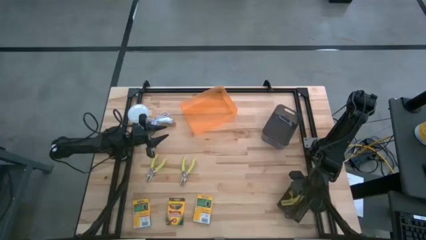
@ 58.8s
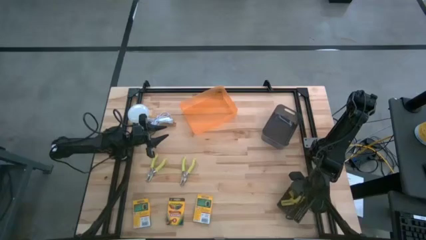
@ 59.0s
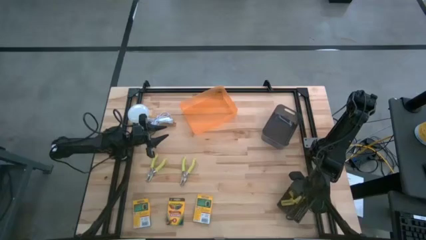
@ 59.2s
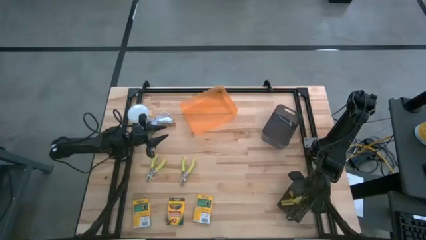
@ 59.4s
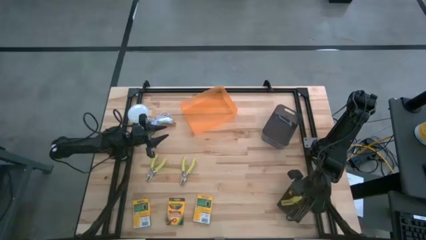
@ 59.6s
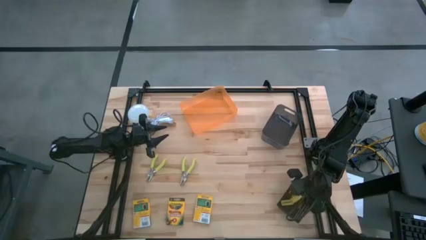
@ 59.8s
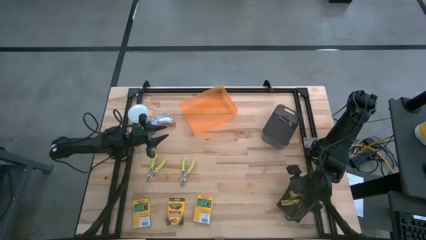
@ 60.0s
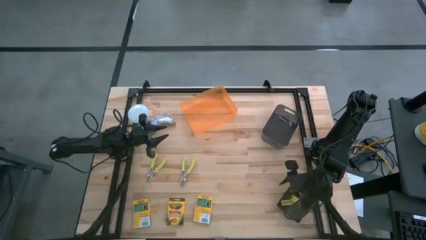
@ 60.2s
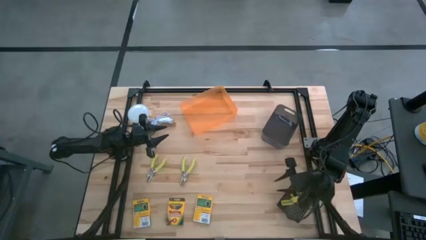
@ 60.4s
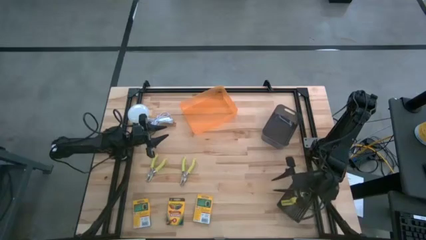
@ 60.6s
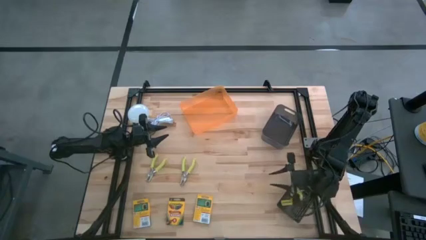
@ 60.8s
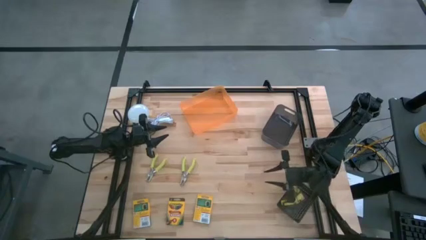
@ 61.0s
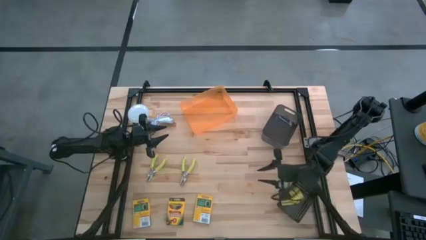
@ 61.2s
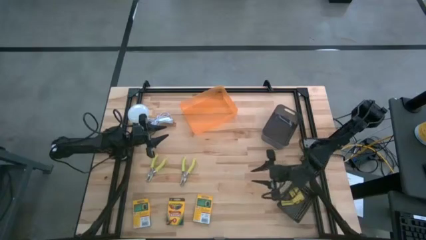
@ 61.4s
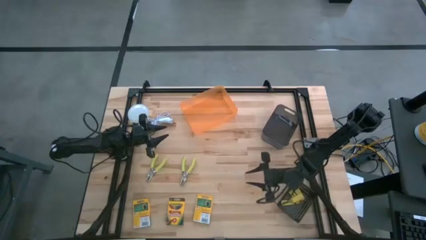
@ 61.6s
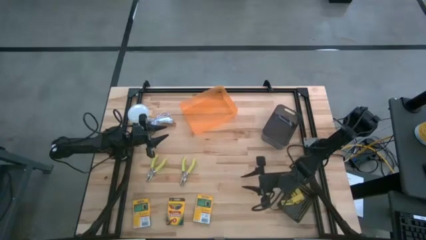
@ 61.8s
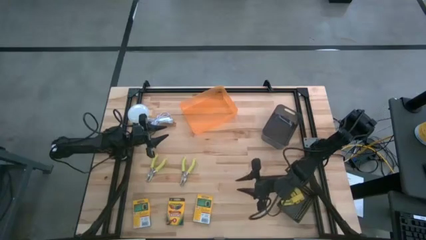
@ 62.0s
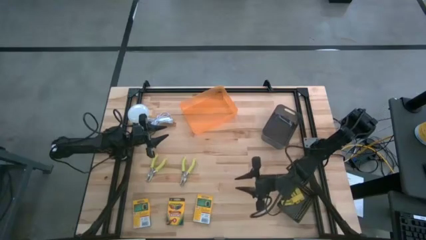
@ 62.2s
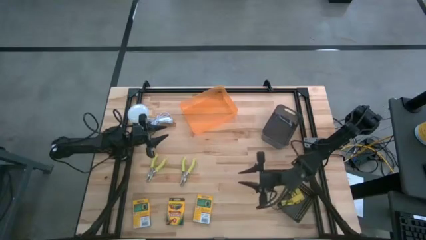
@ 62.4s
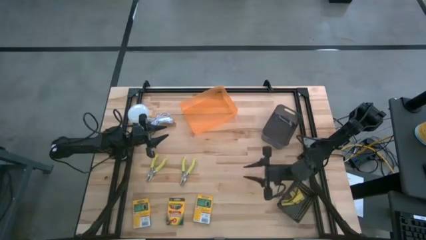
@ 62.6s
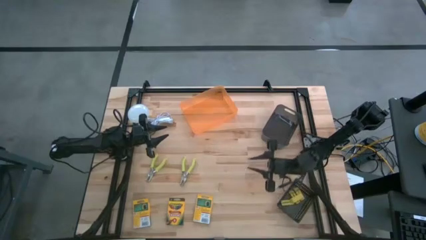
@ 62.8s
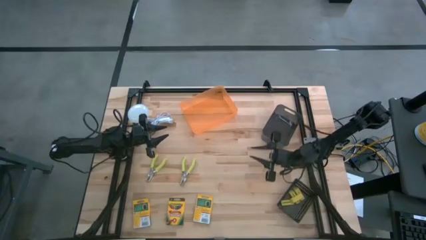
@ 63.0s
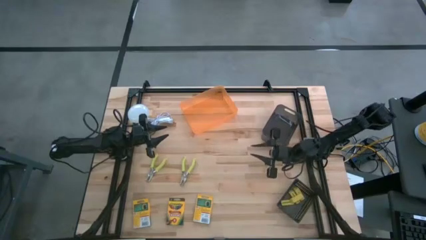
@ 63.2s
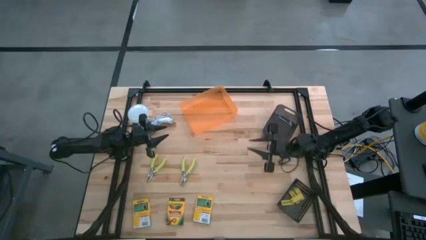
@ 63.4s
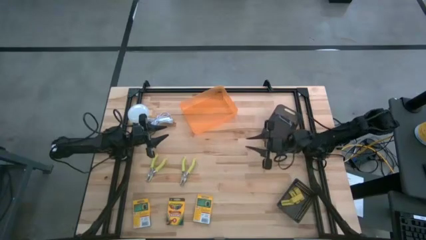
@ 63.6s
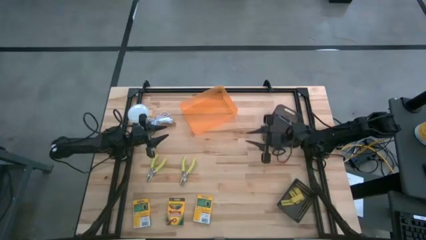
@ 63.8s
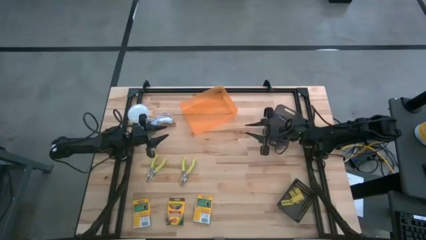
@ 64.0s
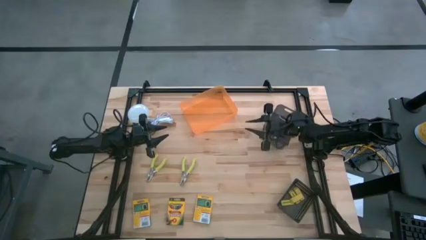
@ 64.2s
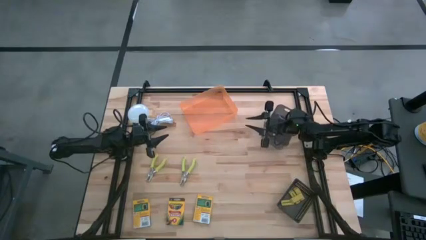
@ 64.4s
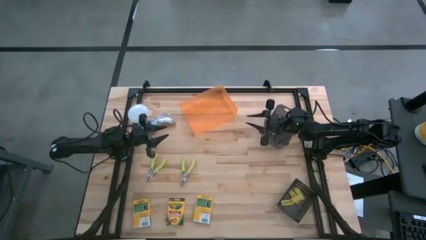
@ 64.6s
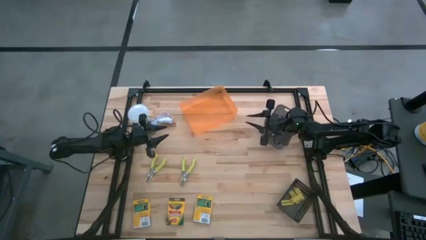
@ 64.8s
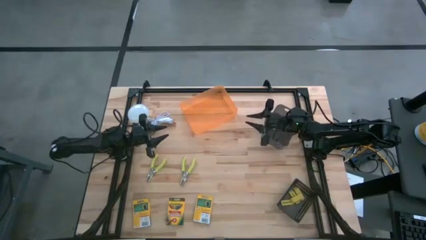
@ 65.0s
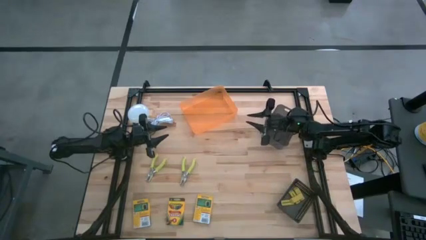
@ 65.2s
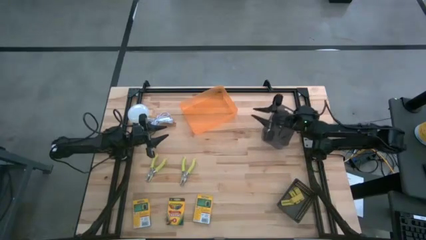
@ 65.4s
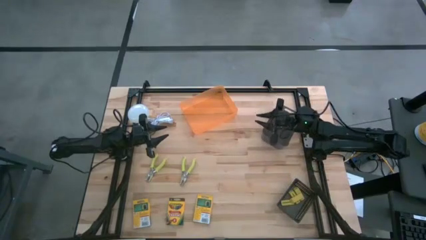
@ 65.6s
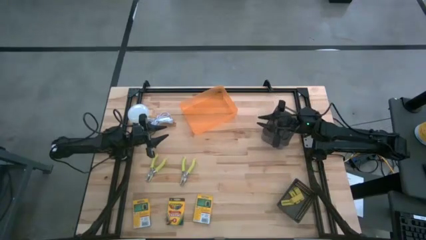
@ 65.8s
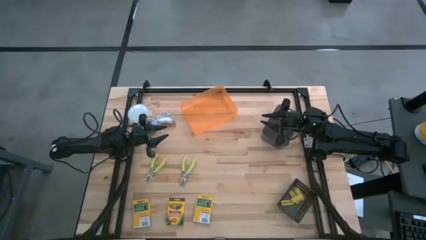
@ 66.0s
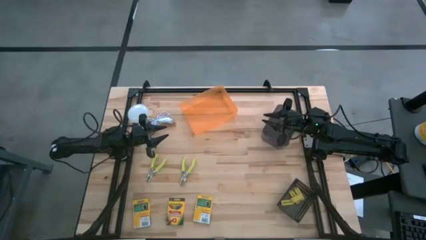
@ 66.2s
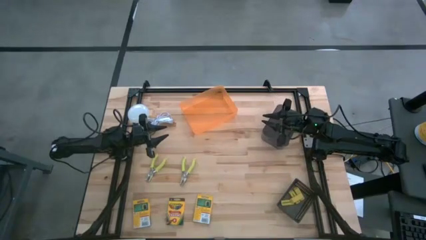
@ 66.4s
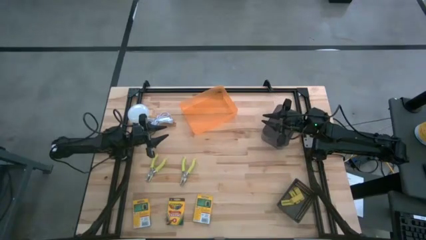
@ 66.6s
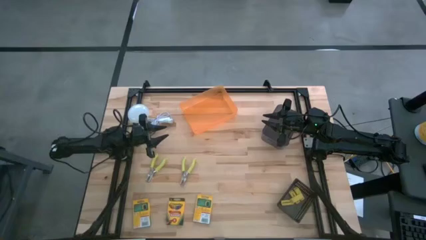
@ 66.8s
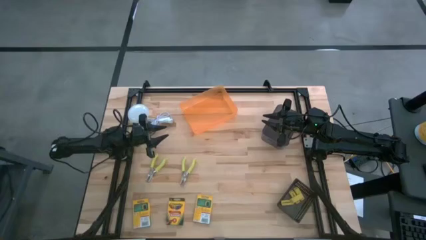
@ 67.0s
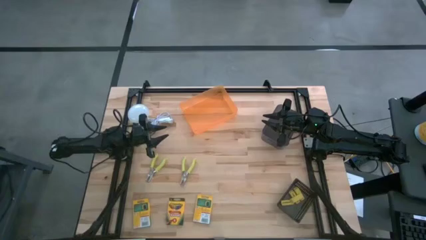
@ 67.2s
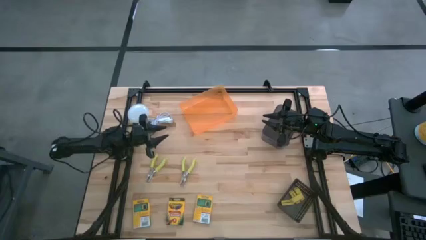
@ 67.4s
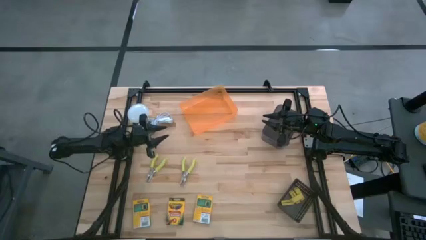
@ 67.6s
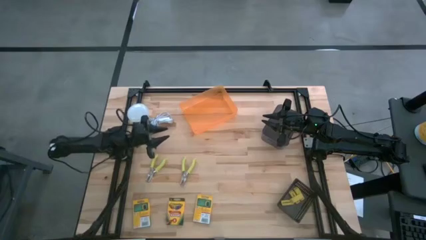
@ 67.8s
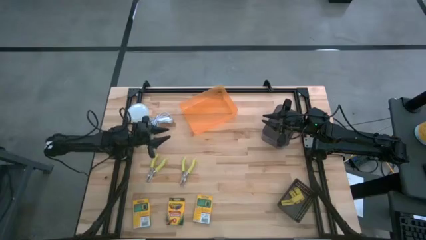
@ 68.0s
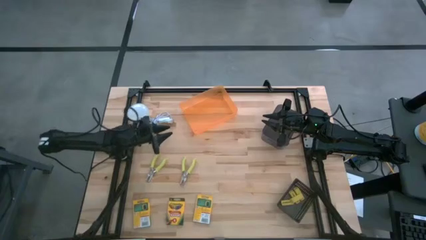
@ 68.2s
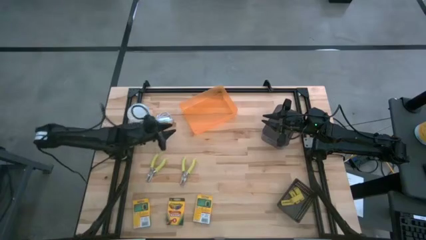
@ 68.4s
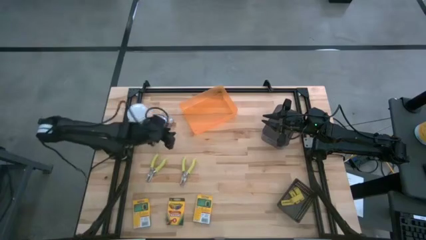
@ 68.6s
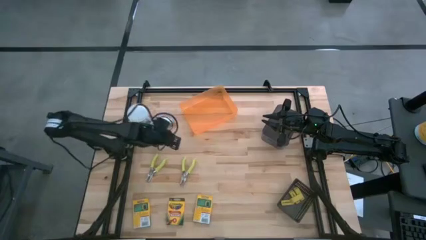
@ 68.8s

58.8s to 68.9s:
Task: Pick & Place School Supplies
Put the yellow hole puncher into the orange bin

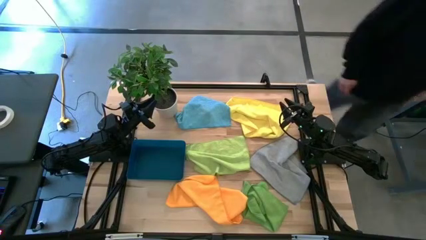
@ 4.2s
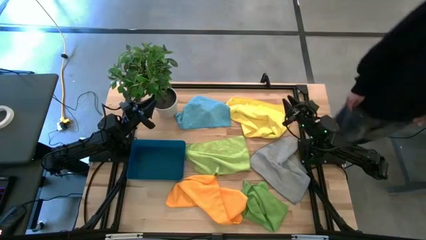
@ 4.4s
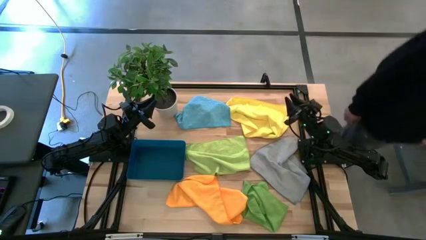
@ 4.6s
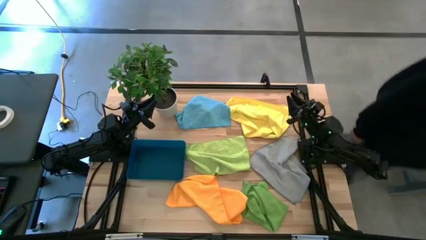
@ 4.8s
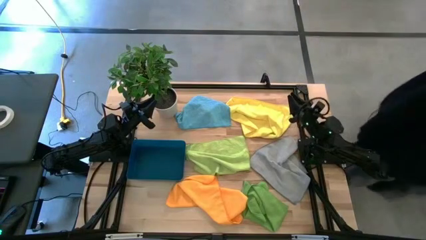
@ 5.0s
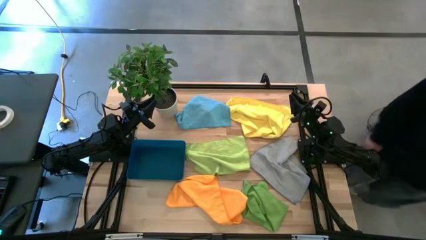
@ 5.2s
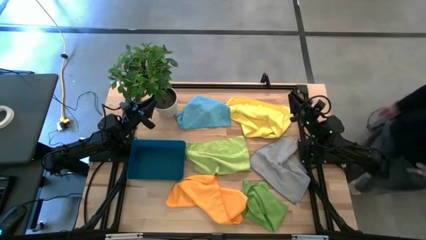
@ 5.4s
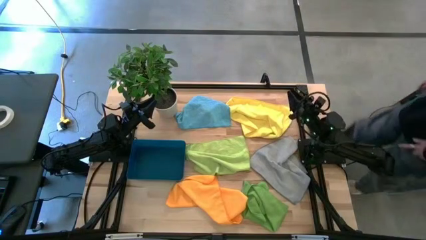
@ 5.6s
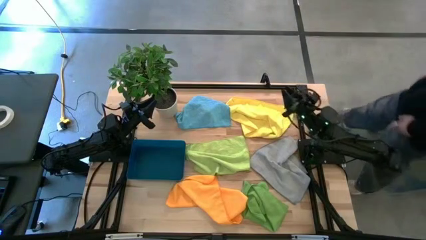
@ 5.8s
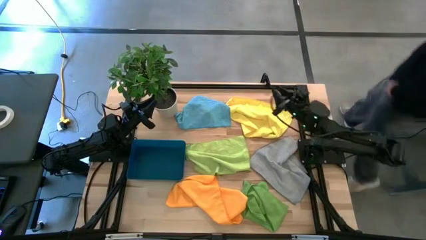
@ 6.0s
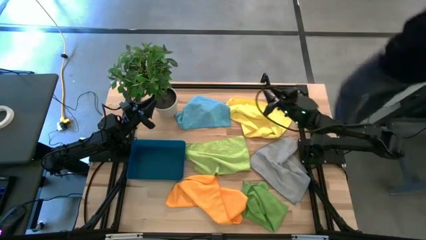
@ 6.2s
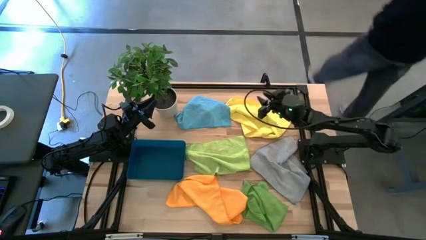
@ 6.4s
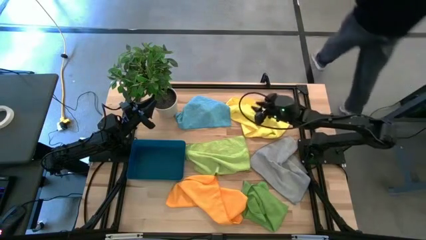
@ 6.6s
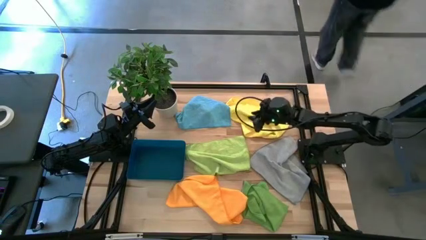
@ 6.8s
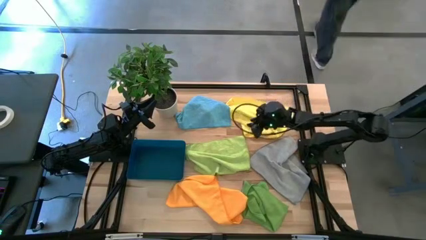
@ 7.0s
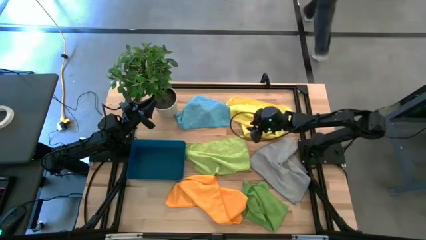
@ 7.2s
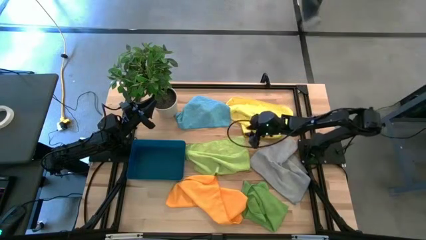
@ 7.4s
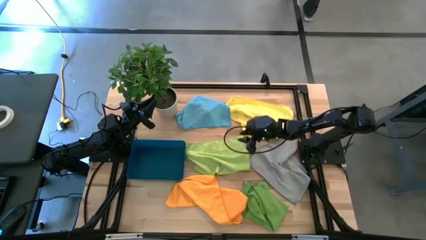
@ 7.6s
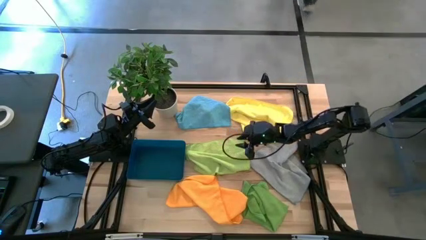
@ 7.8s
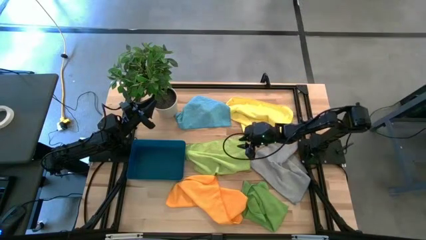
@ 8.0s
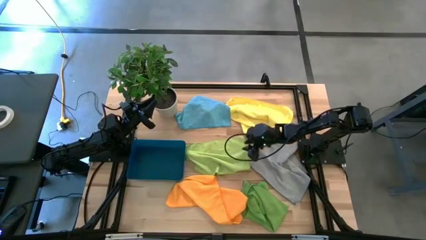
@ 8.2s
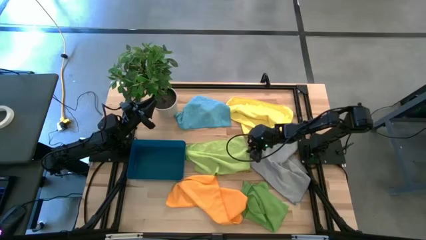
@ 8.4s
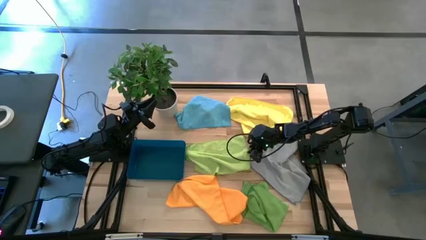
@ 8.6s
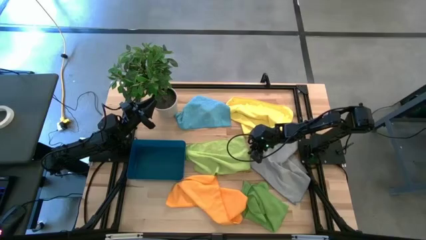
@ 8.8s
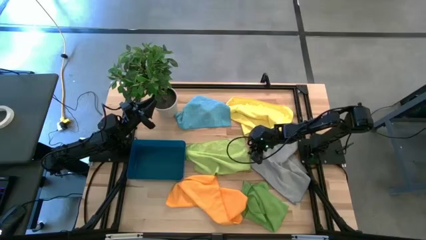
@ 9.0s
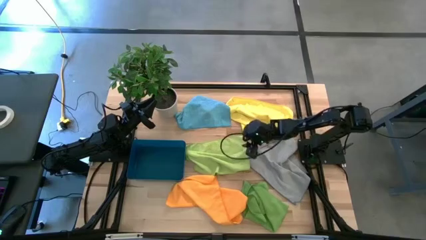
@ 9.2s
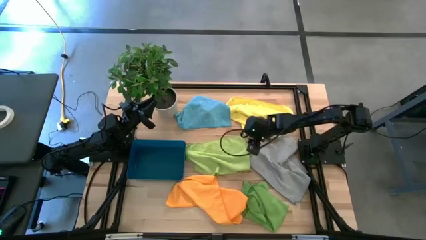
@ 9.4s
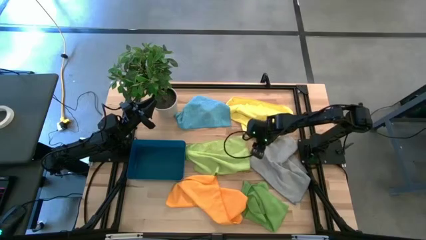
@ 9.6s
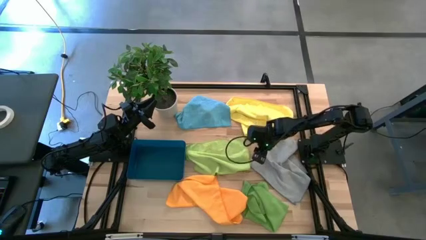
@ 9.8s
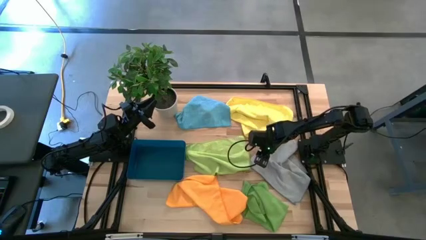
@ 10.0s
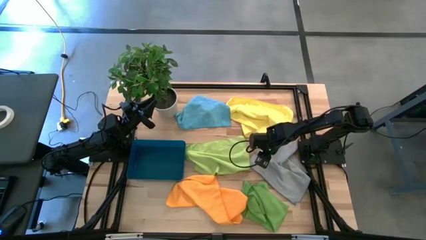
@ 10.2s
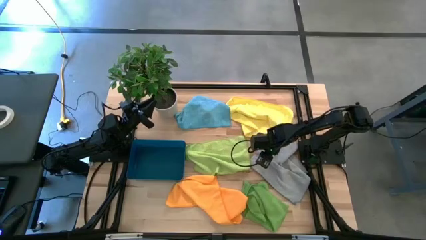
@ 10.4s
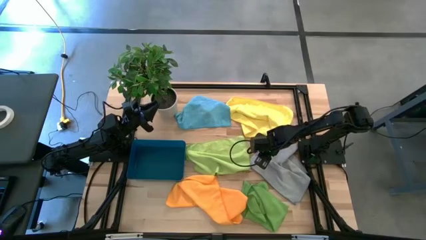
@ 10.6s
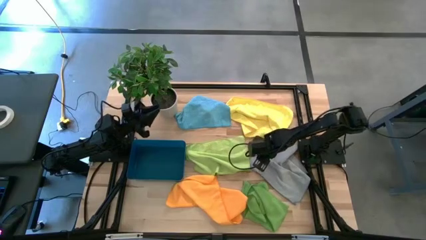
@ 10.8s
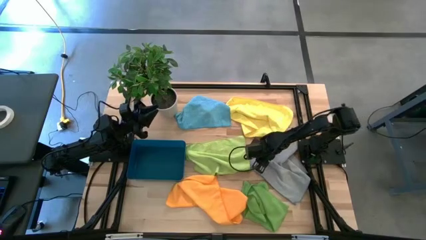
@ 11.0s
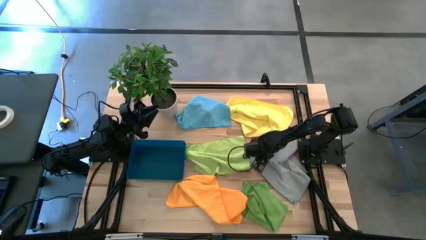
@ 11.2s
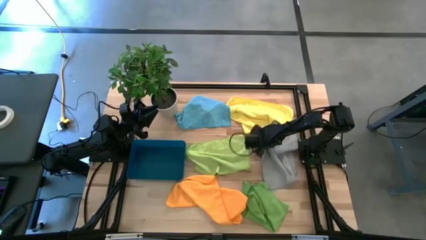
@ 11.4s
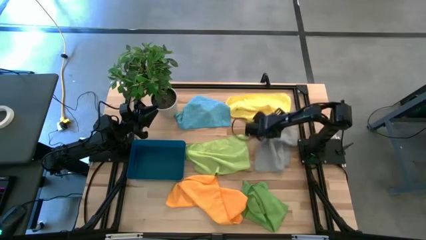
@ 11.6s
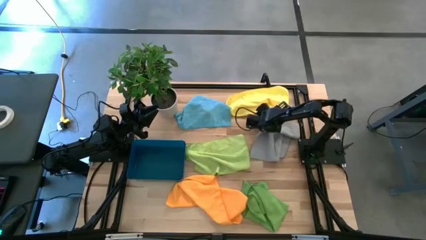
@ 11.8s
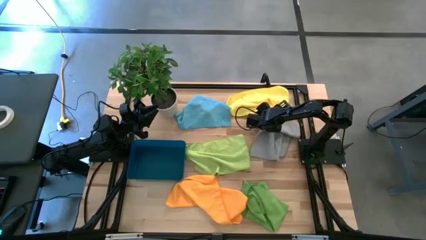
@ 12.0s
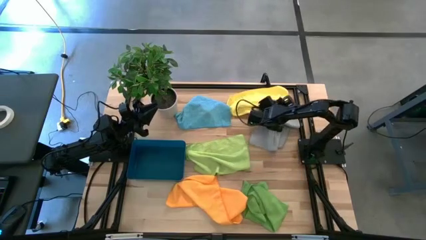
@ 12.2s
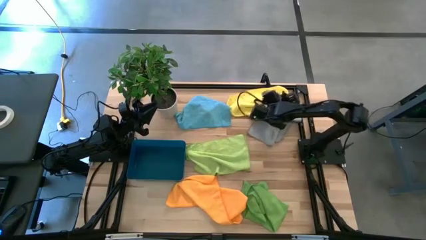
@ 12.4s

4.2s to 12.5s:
Task: Fold microfiber towels
Move the gray microfiber towel to the top right of the table
